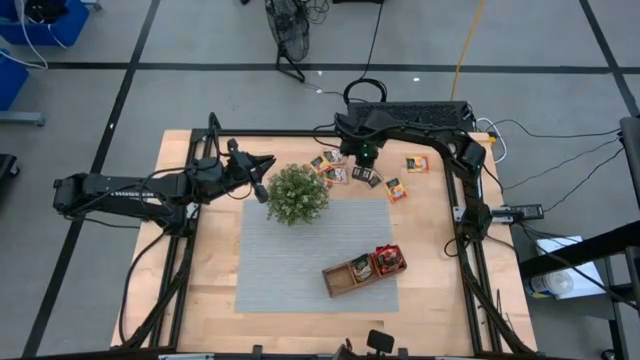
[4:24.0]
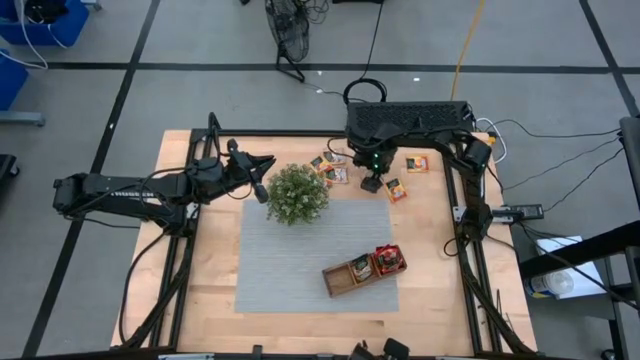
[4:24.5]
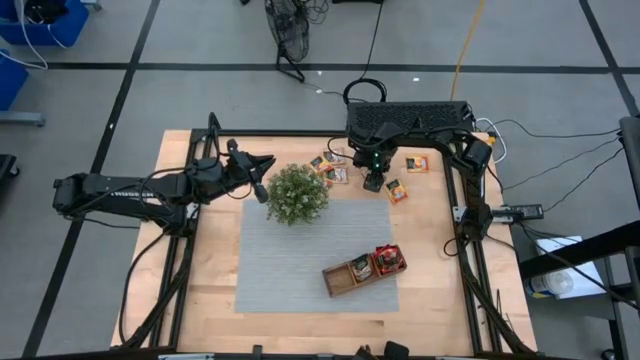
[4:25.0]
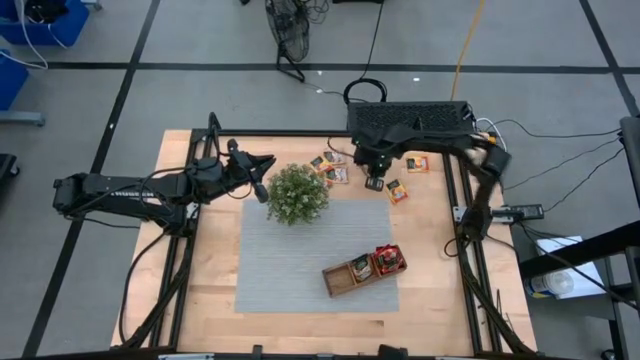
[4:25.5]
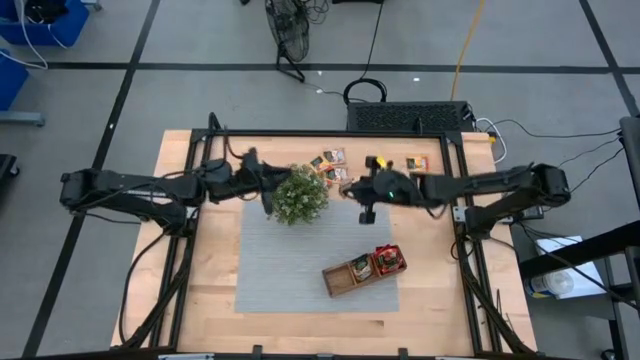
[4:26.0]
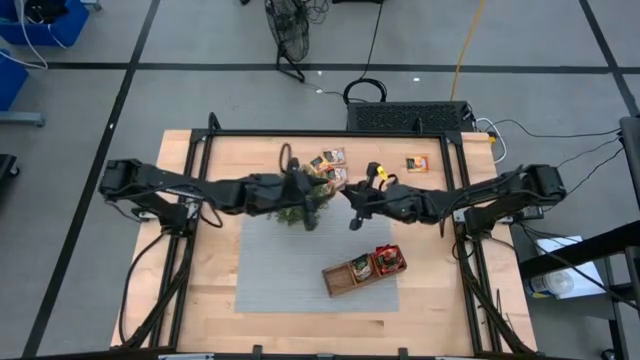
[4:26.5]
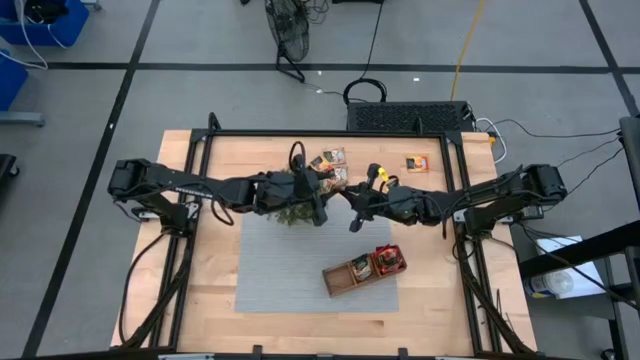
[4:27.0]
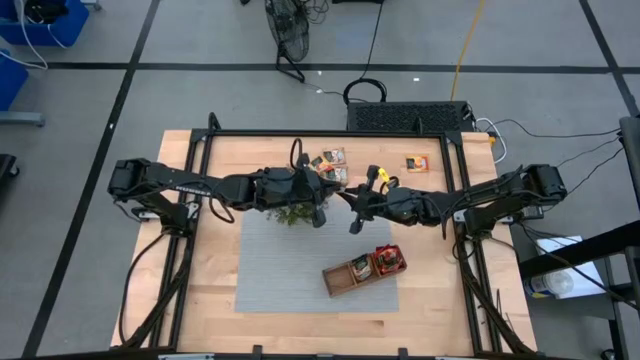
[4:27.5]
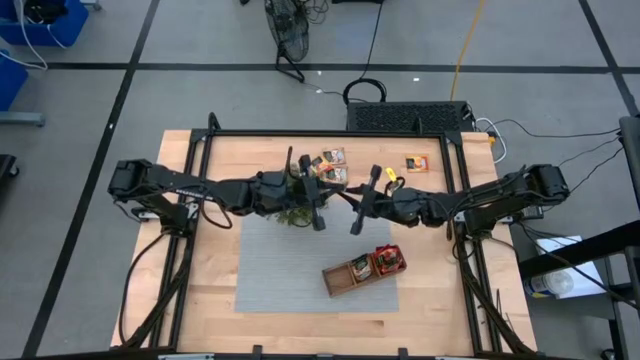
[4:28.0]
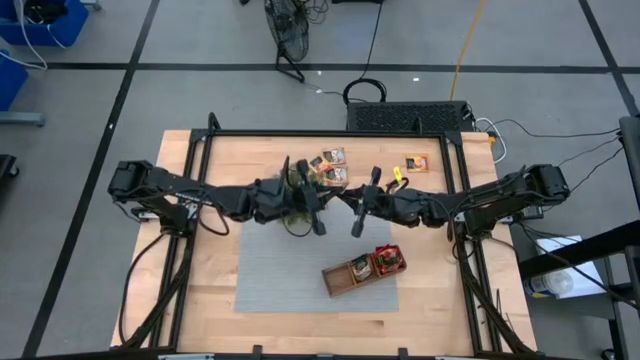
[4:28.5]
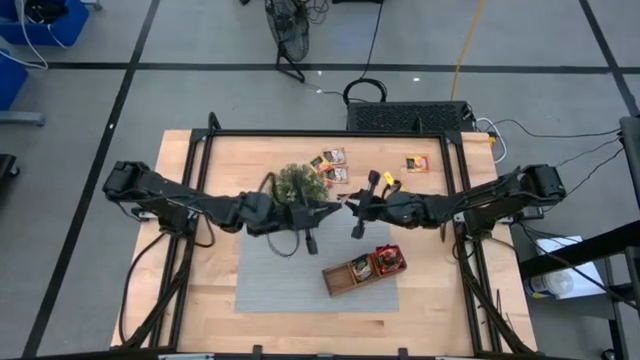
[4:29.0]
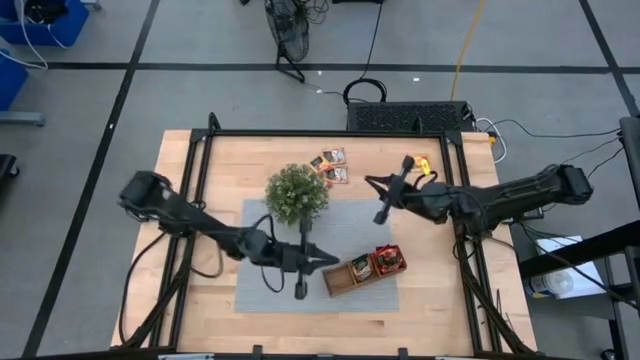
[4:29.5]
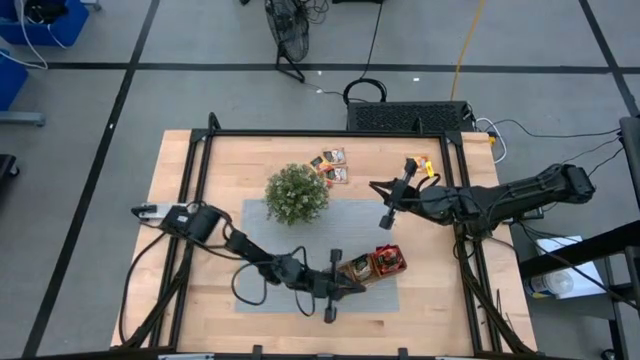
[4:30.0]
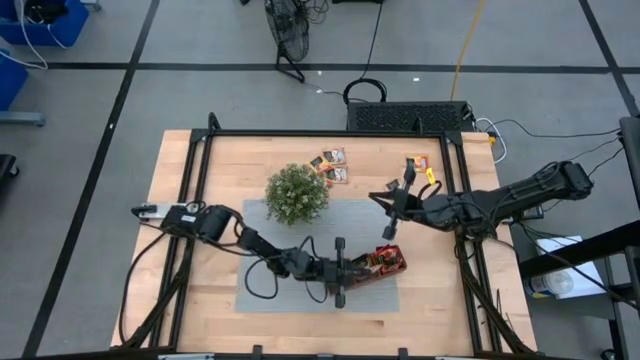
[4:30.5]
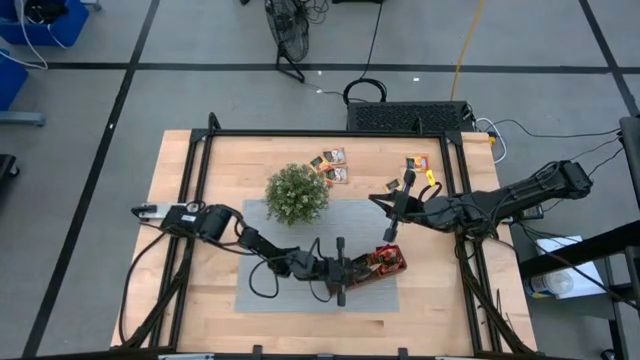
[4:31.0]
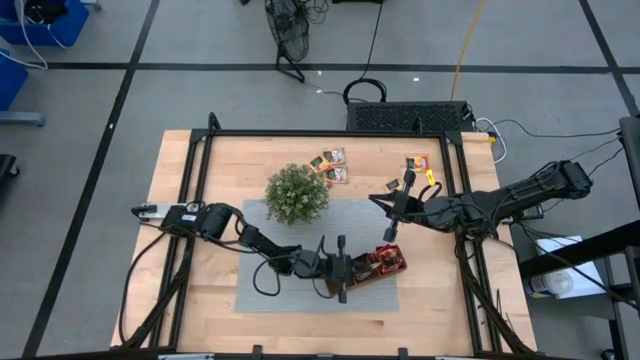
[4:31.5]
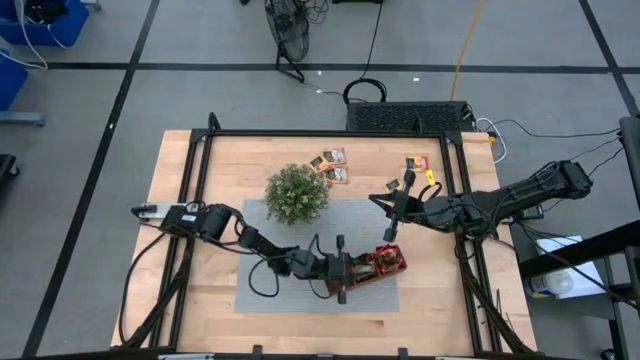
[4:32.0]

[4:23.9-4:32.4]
Task: Pick & Place Tea
Put the apple tea sachet into the brown organizer

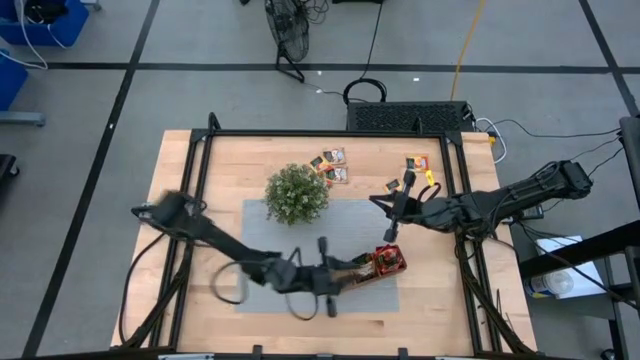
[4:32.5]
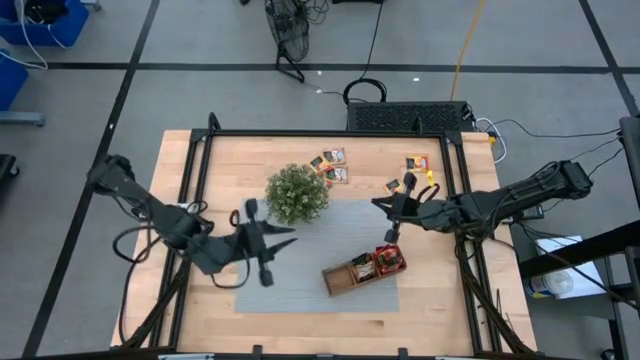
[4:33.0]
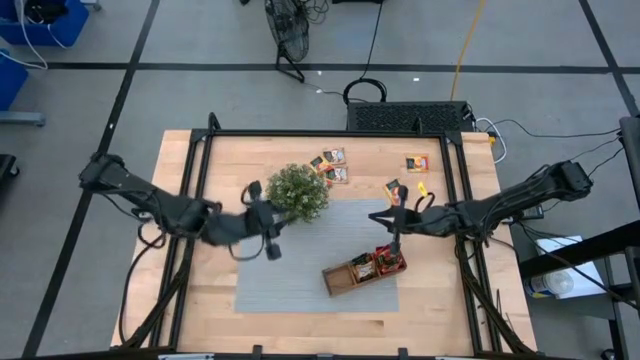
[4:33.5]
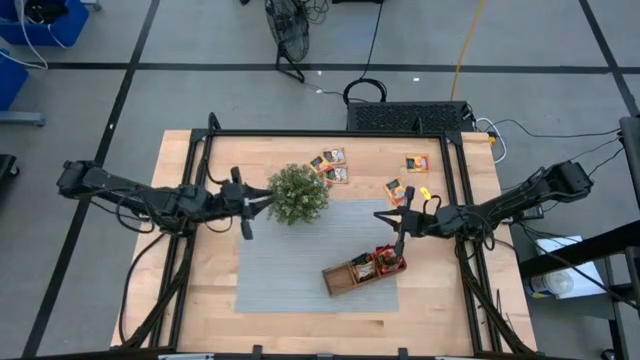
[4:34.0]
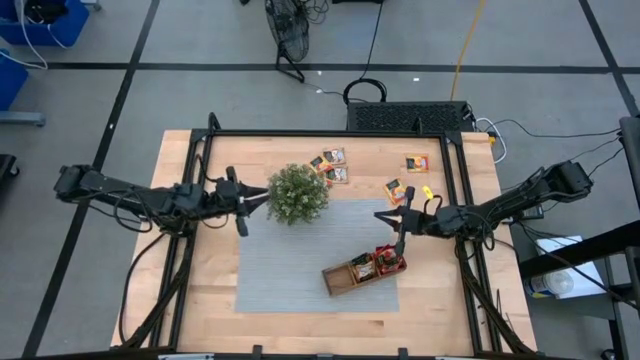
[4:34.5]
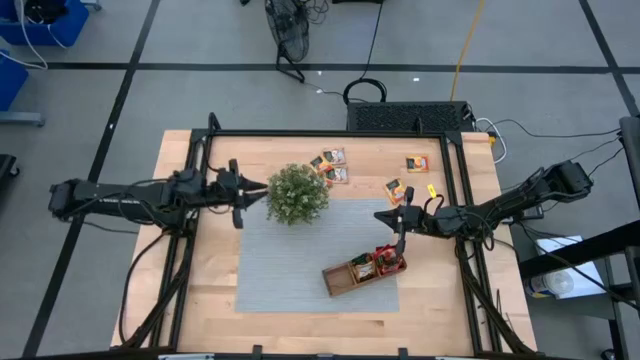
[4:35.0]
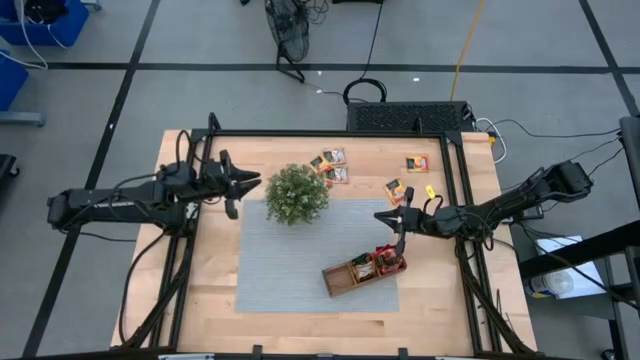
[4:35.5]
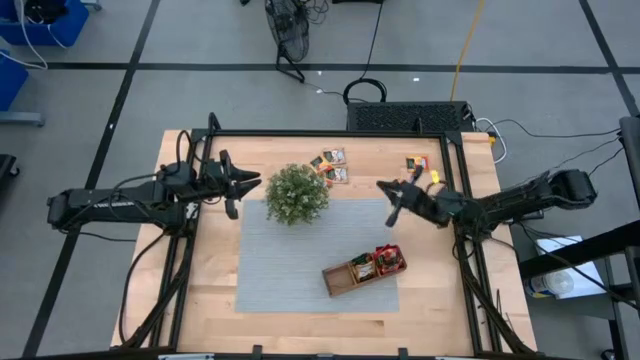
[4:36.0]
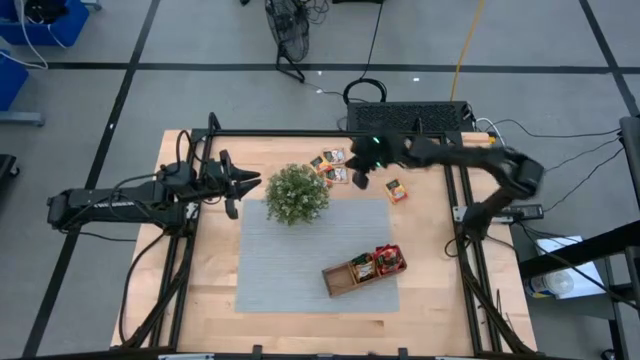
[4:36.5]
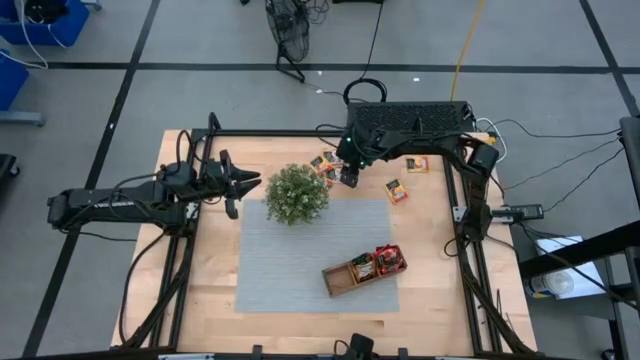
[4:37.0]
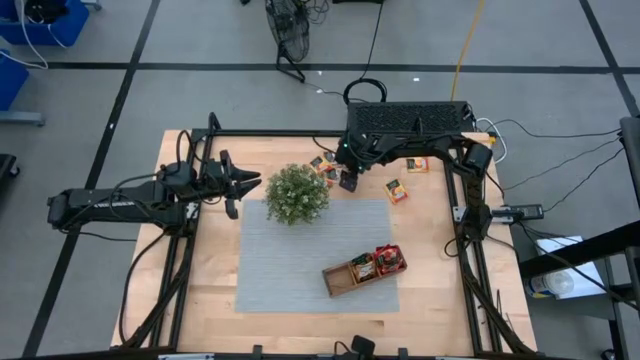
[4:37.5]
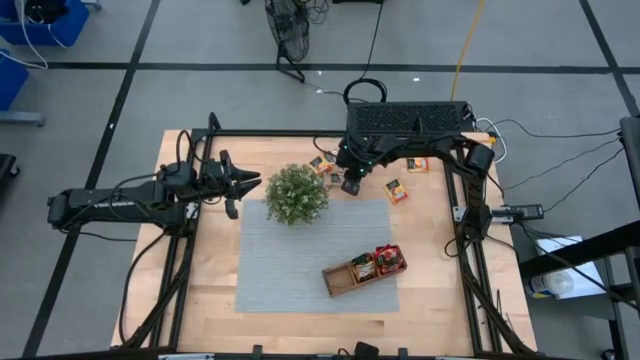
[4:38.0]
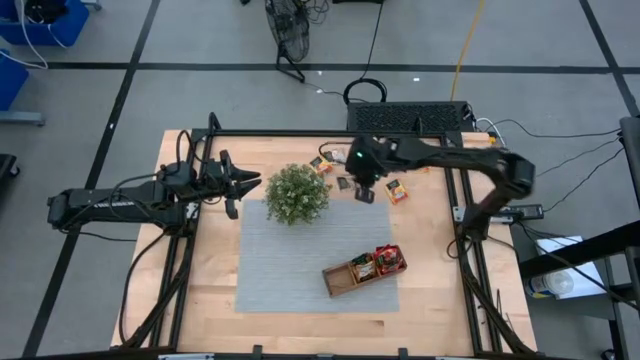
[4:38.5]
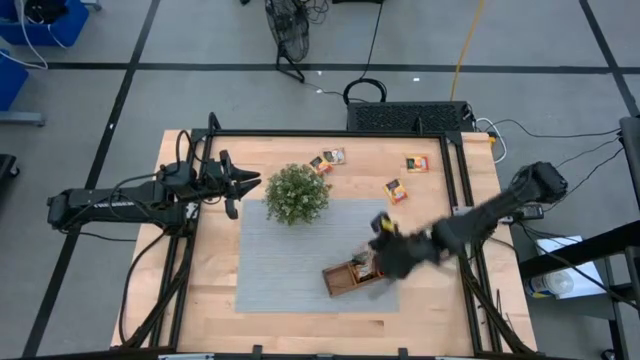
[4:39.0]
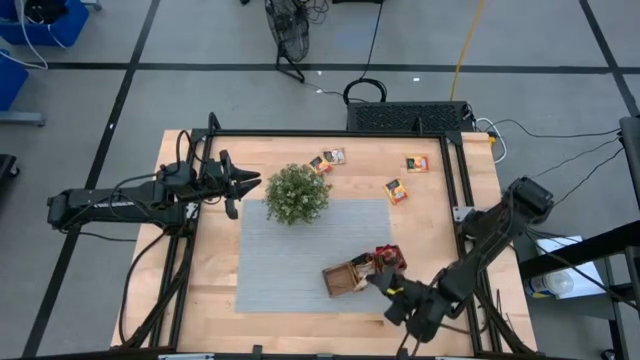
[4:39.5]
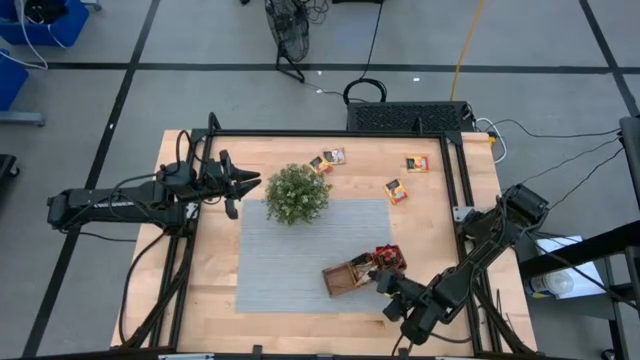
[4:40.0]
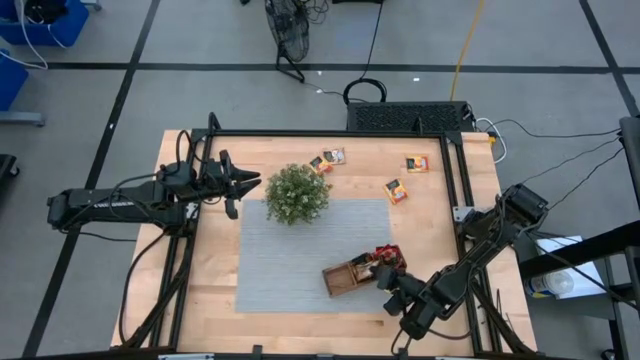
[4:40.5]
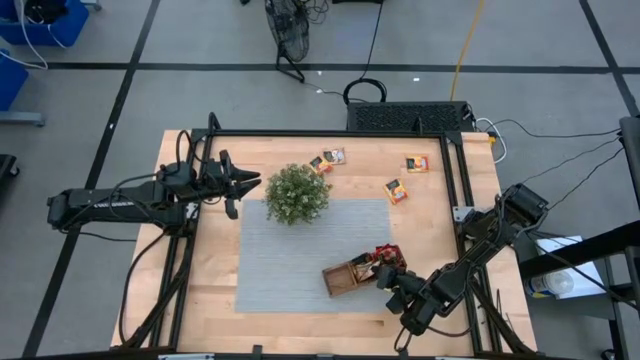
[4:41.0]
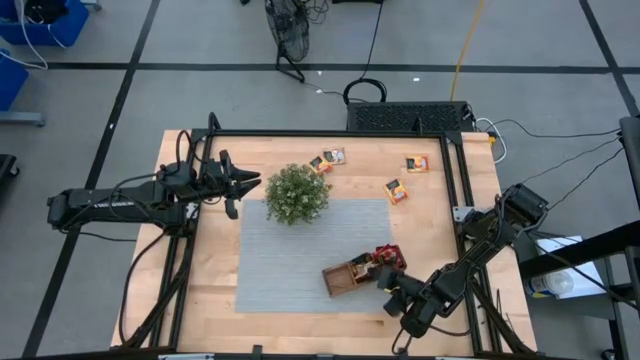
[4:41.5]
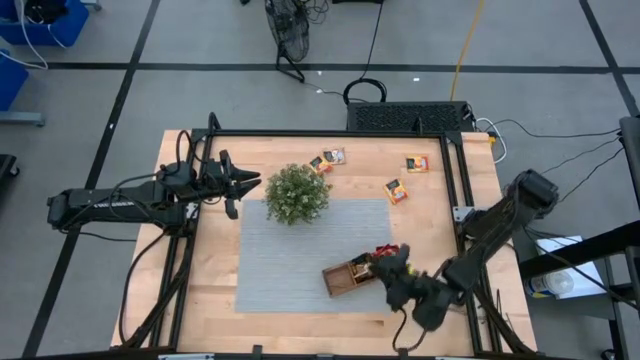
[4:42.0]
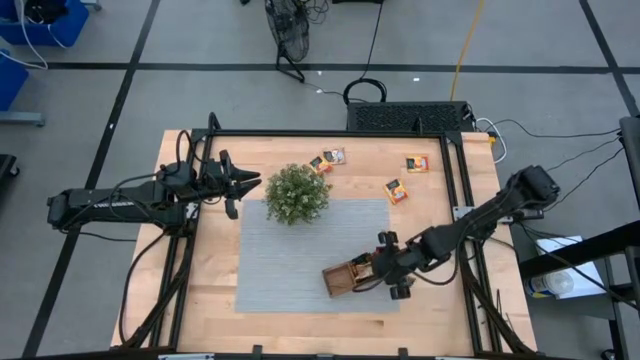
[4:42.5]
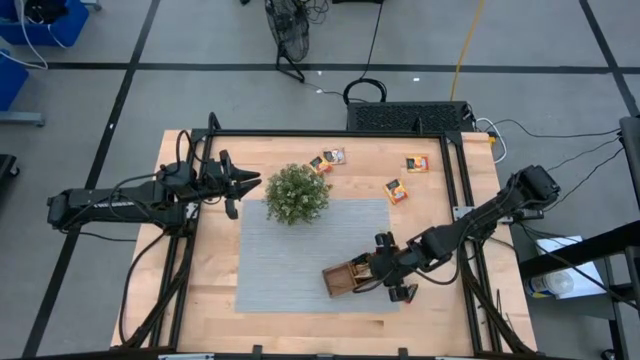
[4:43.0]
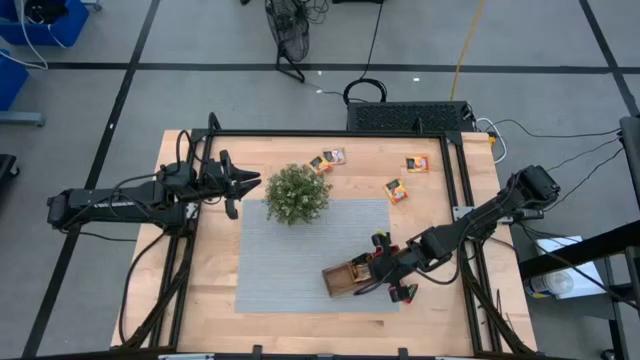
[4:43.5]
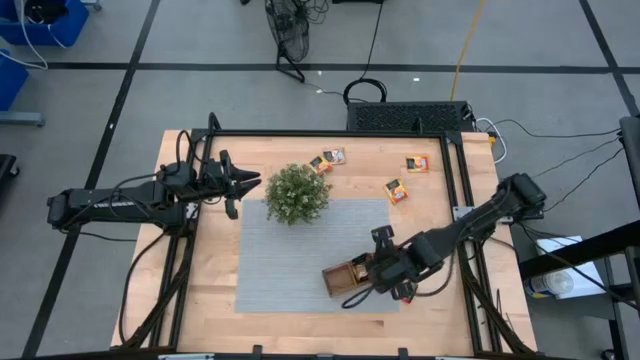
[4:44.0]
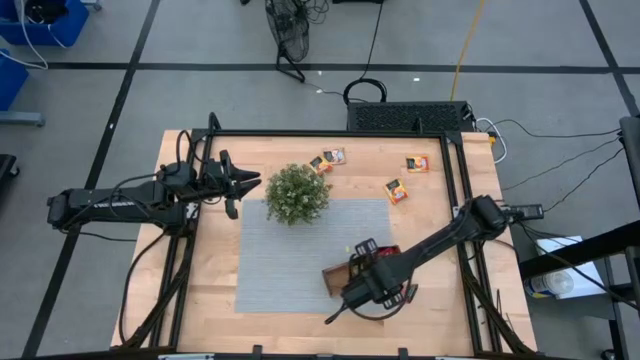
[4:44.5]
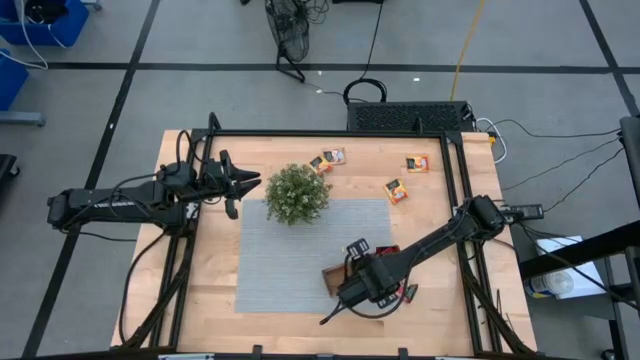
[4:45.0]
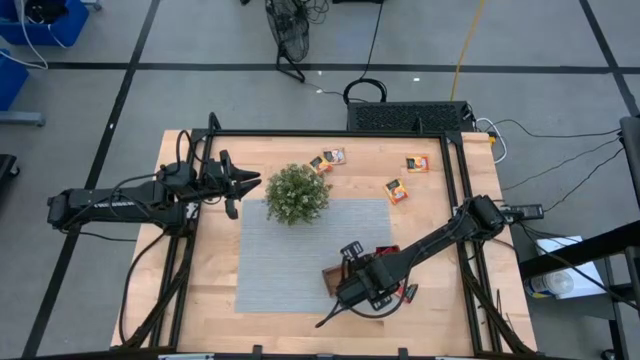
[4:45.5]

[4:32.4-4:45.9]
Put the apple tea sachet into the brown organizer
